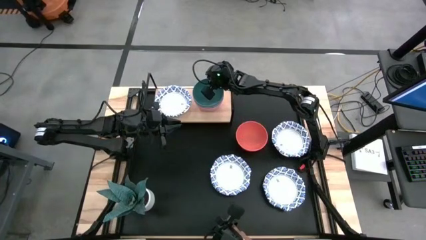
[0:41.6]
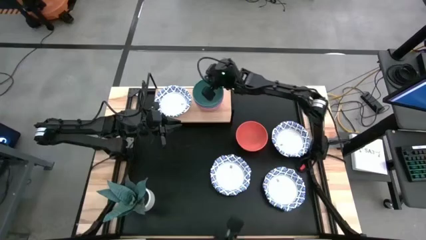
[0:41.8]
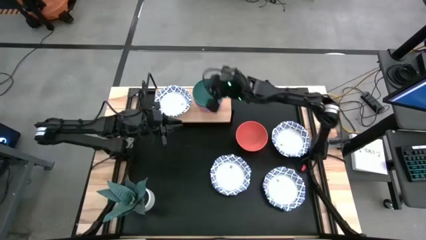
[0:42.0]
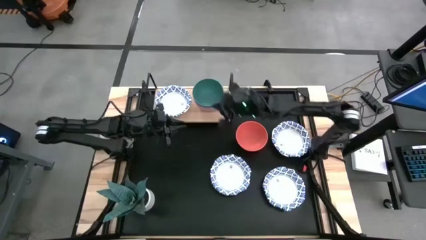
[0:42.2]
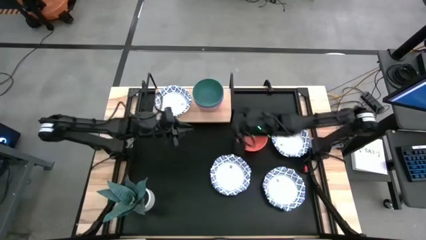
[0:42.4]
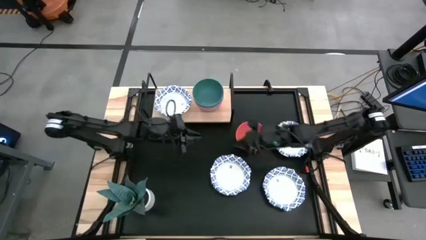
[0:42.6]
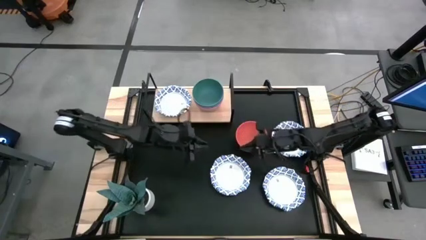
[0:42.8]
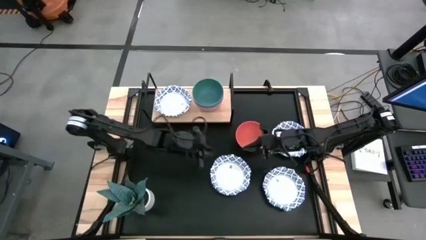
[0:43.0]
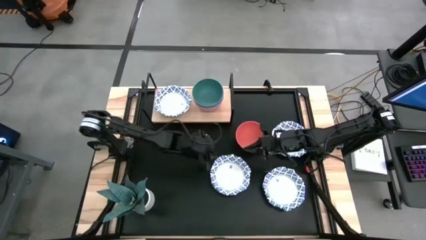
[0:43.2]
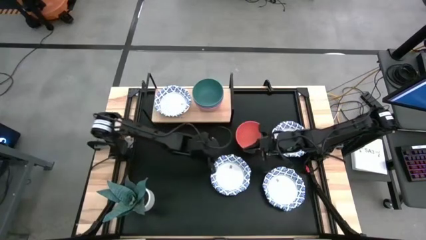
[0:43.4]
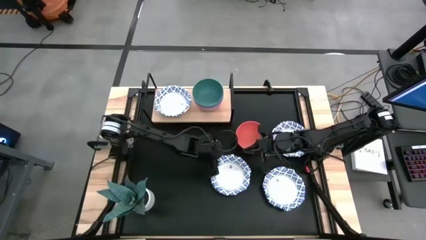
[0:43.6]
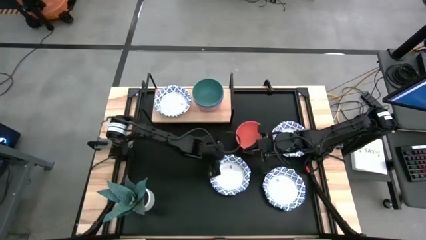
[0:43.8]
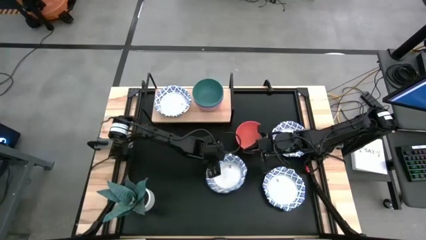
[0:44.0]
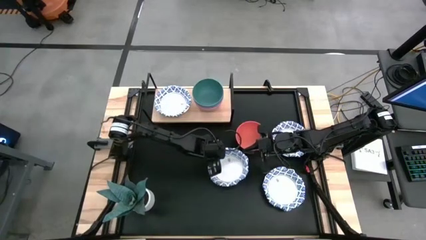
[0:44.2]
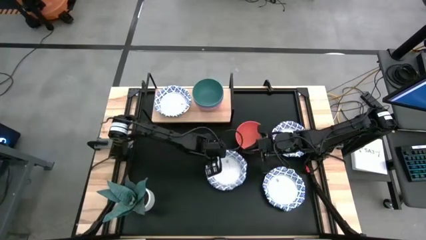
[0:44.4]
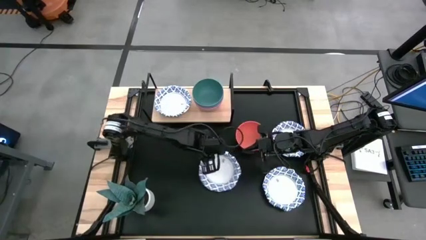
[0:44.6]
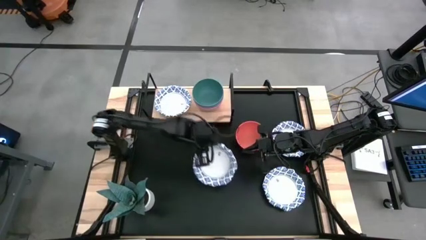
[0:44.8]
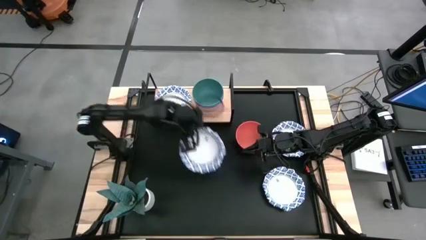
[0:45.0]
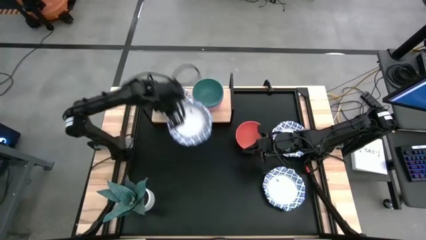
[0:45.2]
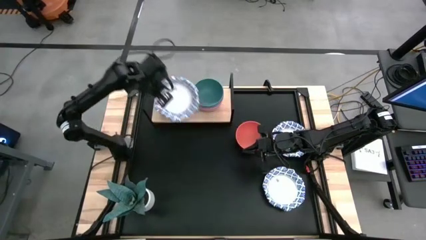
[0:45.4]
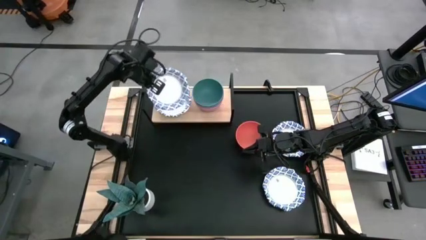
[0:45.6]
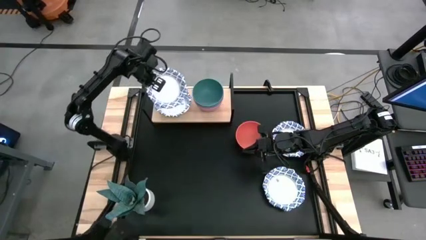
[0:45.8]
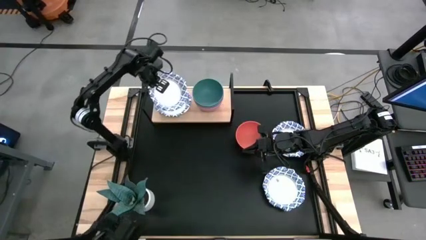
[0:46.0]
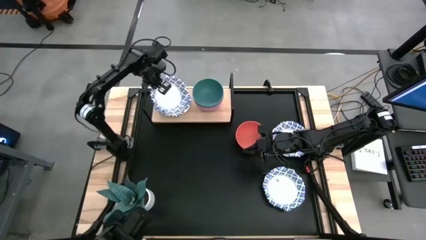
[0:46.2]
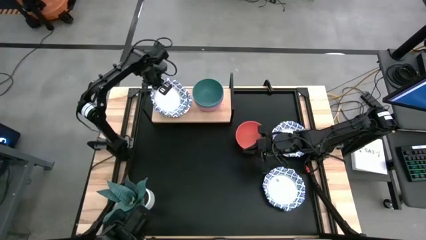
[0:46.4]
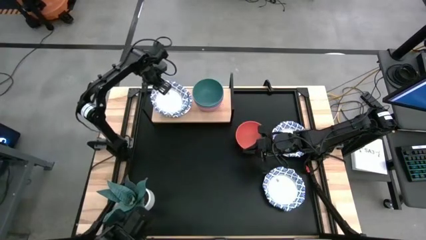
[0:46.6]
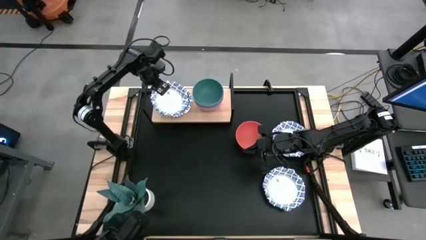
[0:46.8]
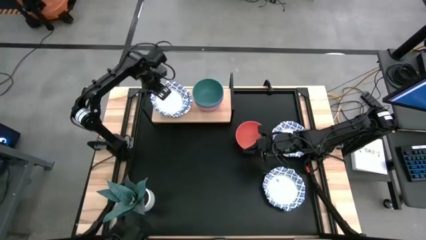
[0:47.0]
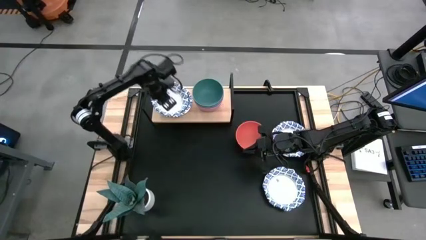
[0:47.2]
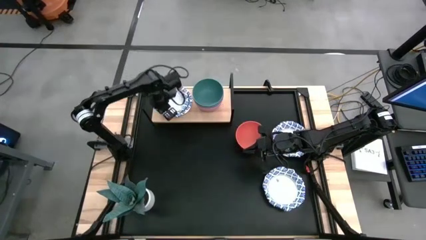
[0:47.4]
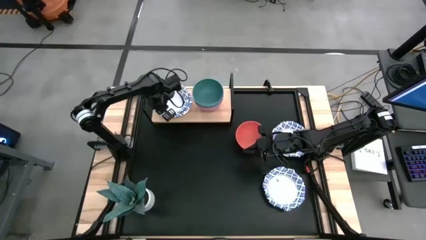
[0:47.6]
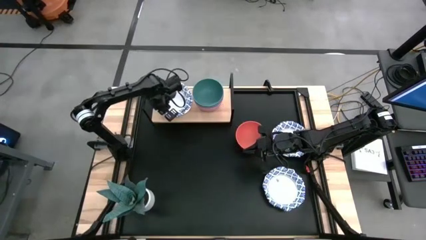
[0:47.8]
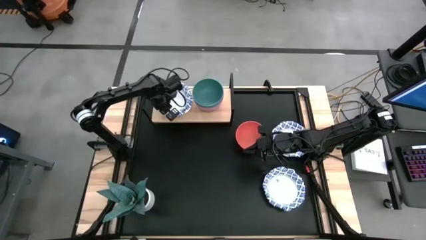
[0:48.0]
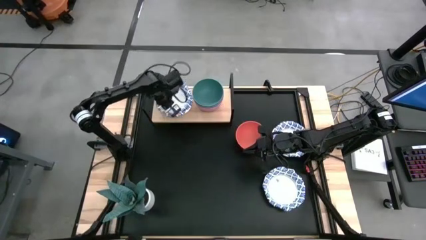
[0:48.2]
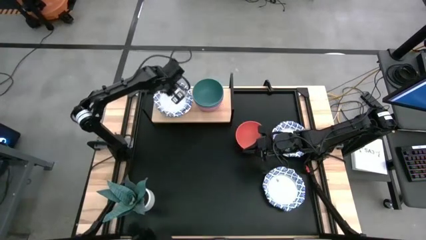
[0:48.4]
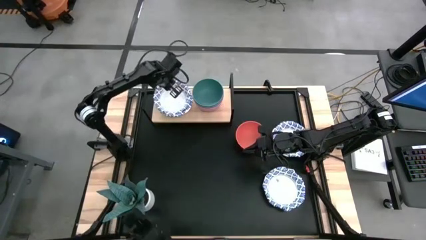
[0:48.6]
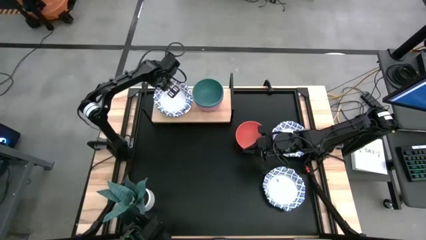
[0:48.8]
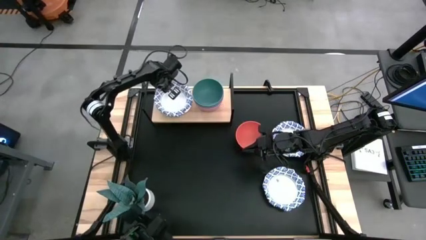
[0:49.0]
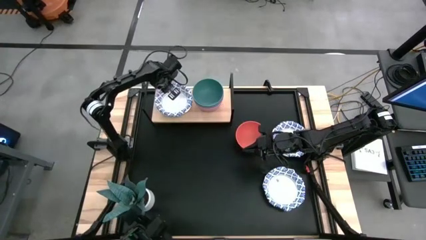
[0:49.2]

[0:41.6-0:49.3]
Task: Place and stack bowls onto a shelf
Stack the white patterned bowl on top of the white patterned bowl

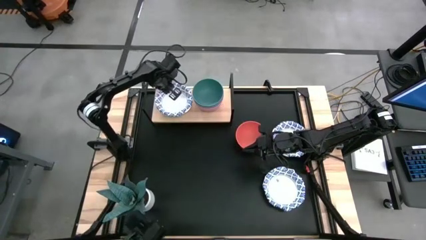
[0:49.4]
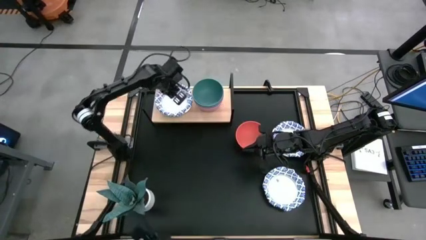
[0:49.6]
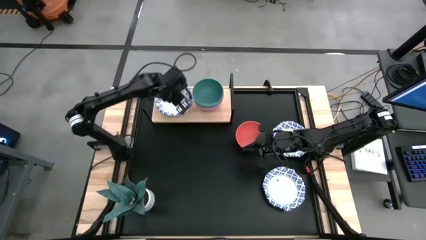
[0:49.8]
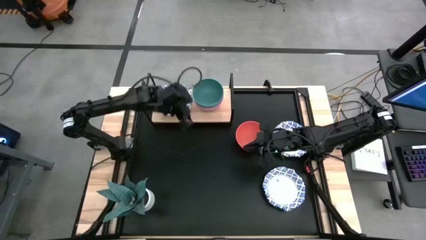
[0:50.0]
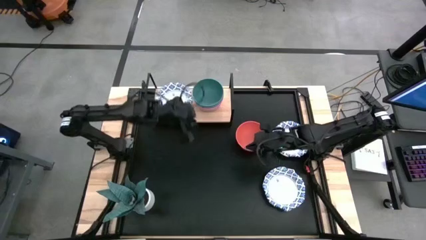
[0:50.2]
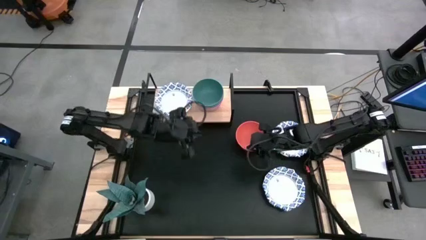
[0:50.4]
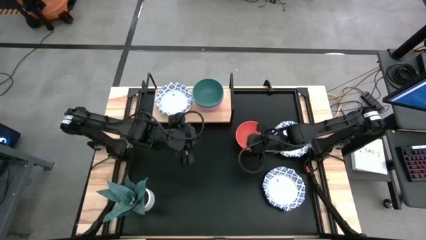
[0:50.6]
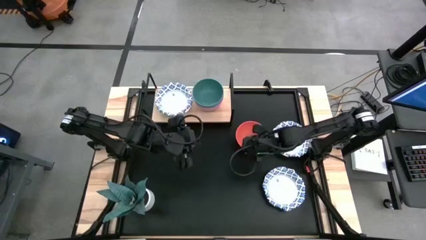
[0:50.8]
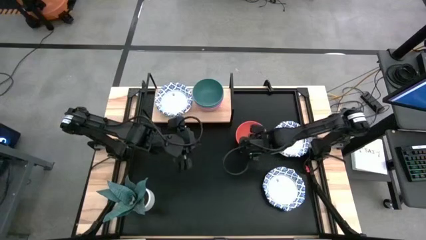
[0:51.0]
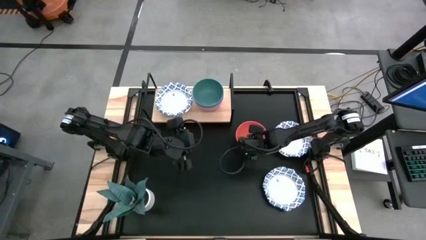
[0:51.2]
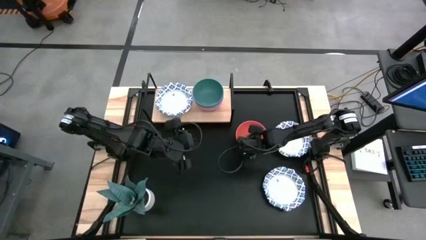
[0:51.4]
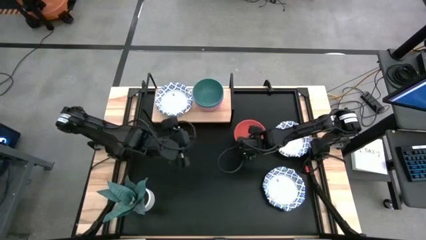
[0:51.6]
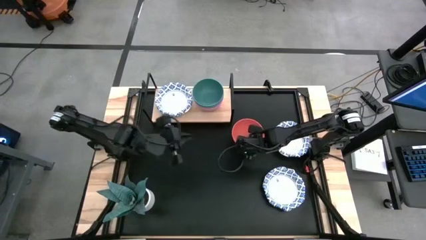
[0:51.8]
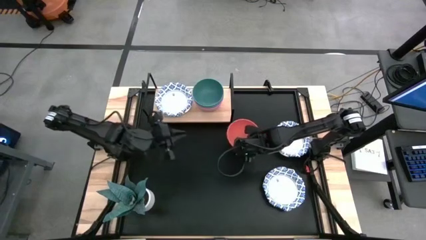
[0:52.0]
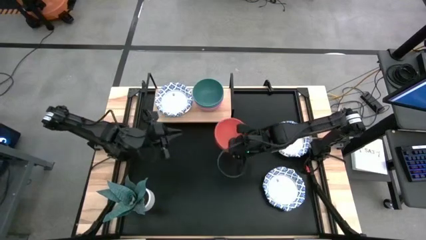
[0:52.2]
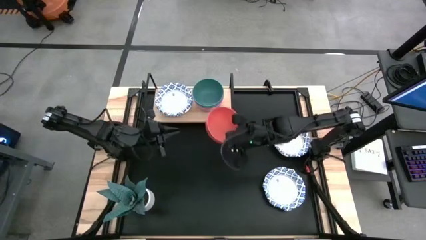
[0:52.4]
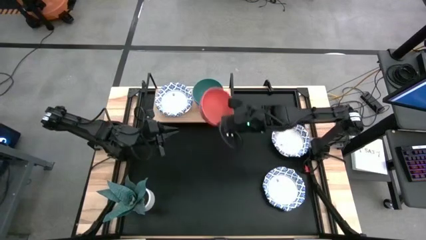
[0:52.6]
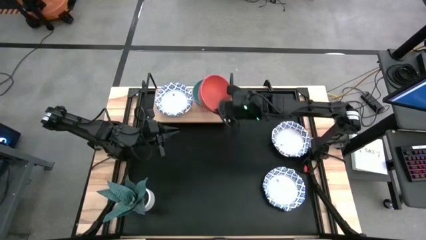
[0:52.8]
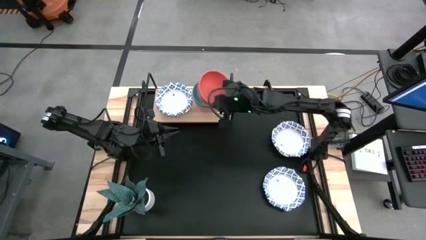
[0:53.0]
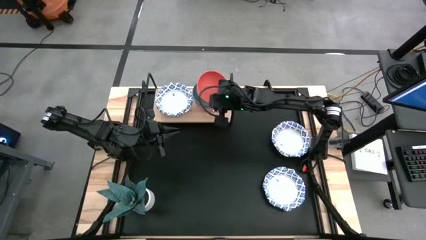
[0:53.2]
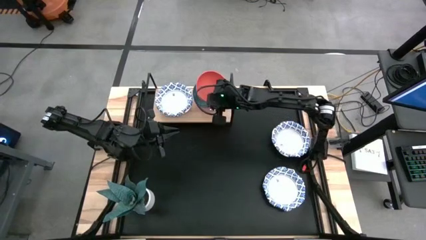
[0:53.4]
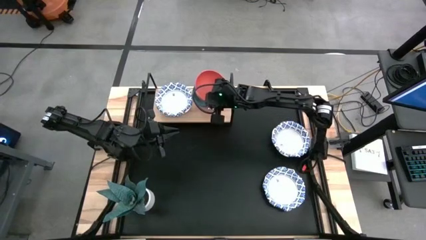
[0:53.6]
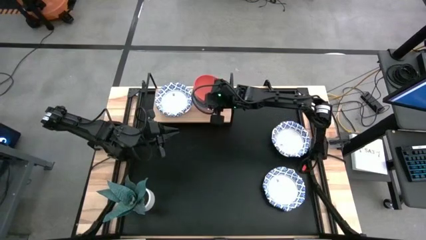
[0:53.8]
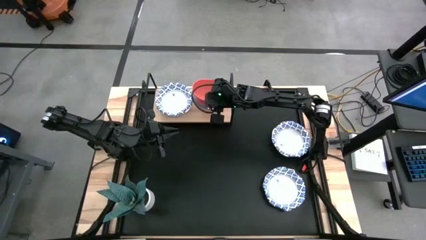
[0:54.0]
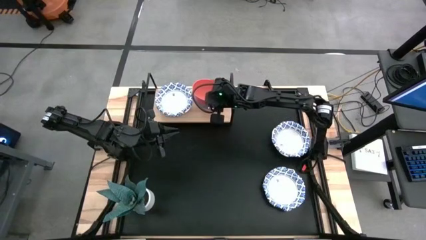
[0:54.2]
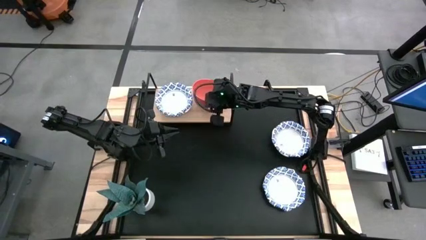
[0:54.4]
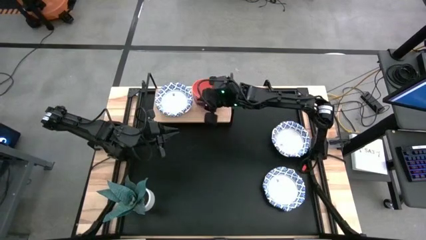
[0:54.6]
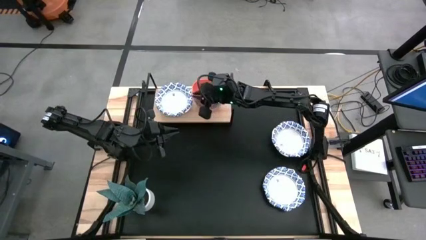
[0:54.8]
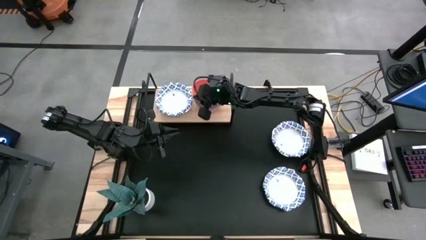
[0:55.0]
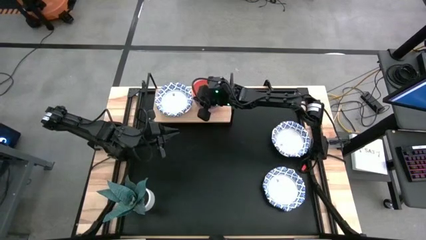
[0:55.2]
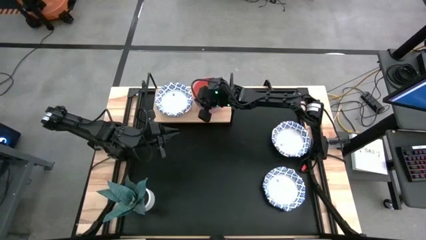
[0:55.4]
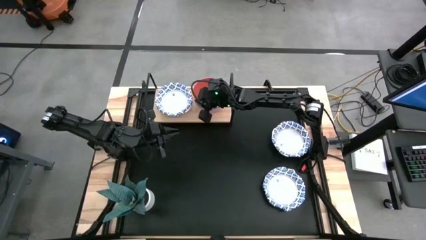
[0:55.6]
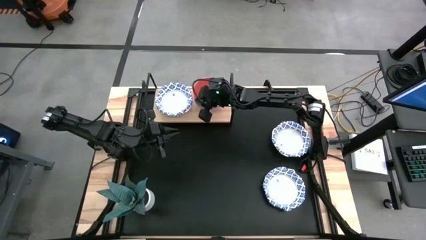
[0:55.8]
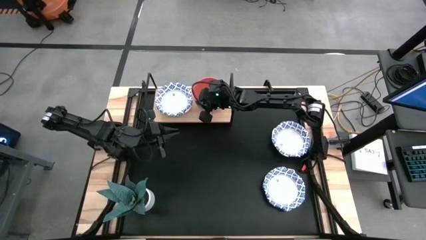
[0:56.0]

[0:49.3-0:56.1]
Stack the orange bowl on top of the green bowl

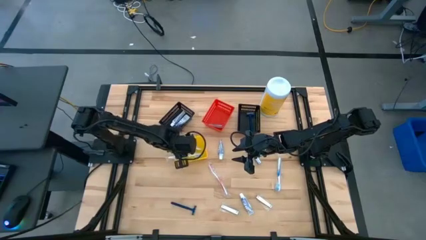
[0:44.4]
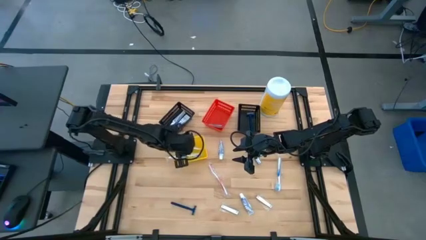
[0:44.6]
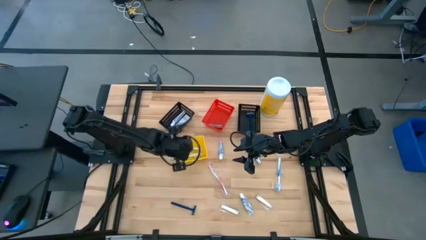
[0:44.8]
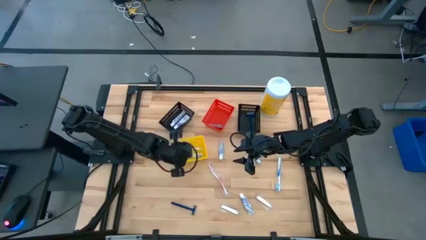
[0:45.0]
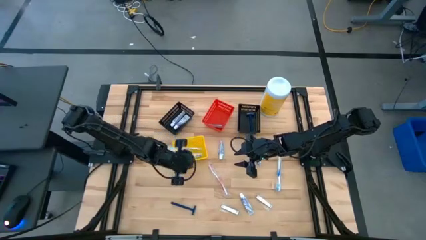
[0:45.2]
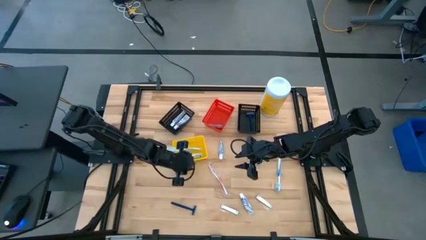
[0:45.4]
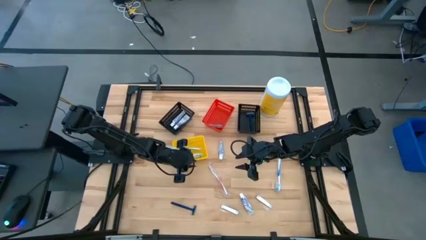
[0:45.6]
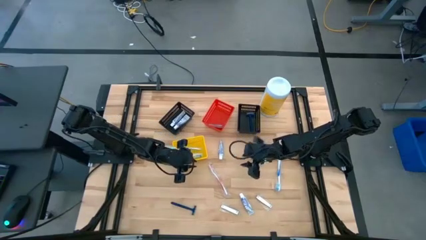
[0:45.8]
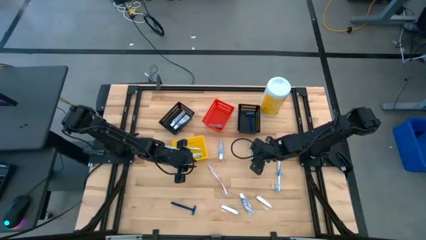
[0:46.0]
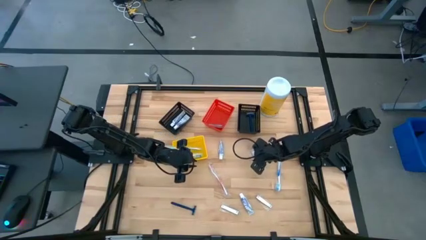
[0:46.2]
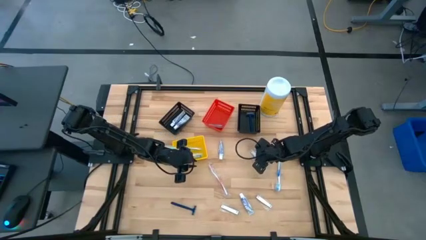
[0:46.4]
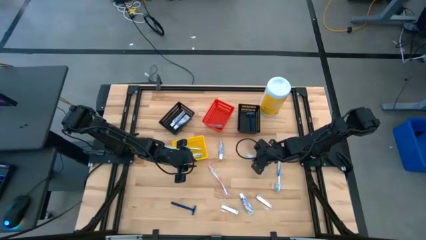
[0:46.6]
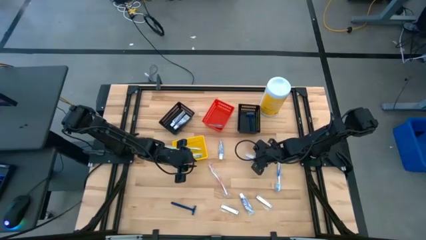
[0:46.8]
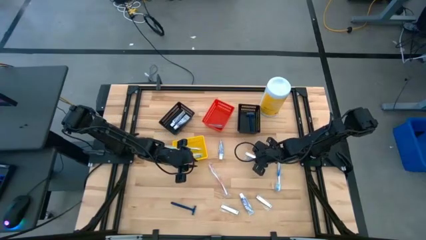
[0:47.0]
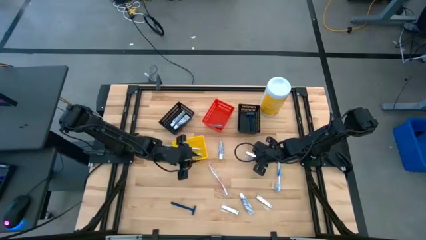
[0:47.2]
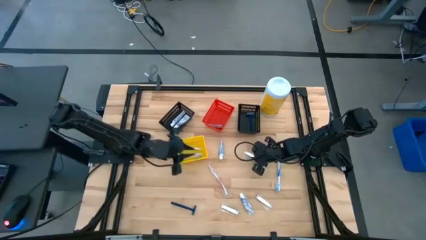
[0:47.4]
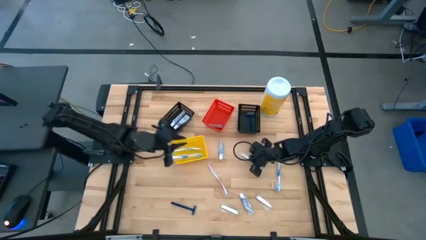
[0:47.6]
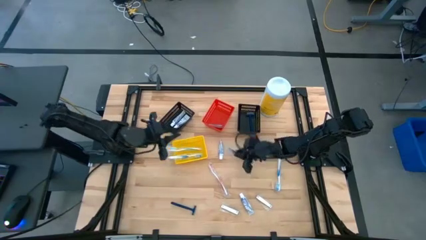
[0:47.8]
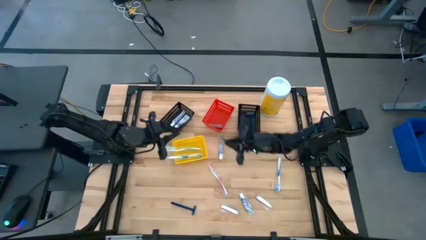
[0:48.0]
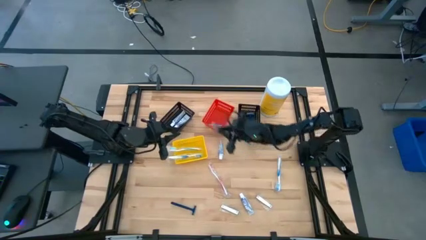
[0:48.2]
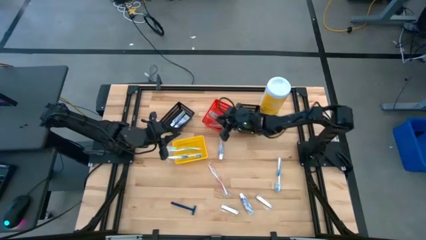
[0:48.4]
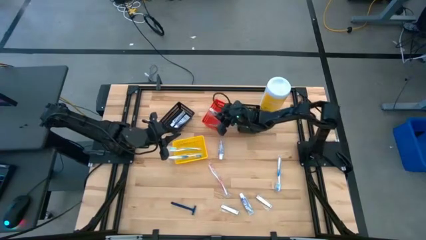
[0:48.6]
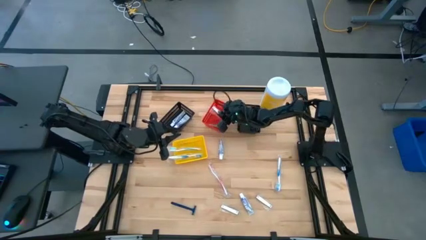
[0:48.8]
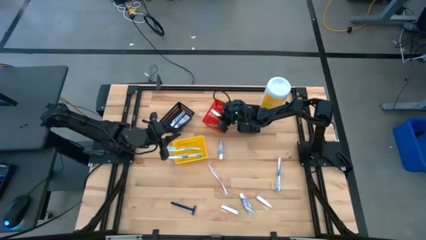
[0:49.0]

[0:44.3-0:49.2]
Task: Pick & Place Travel size toiletries
Put the silver nail cutter into the red bin
